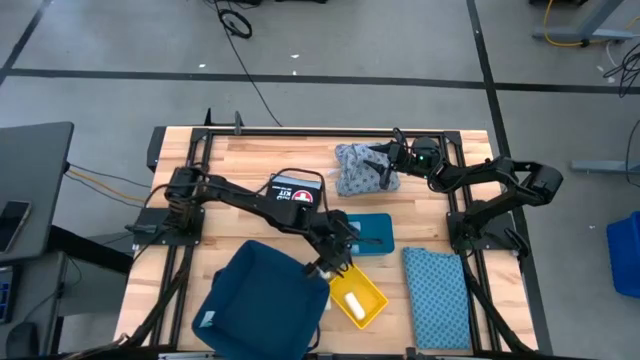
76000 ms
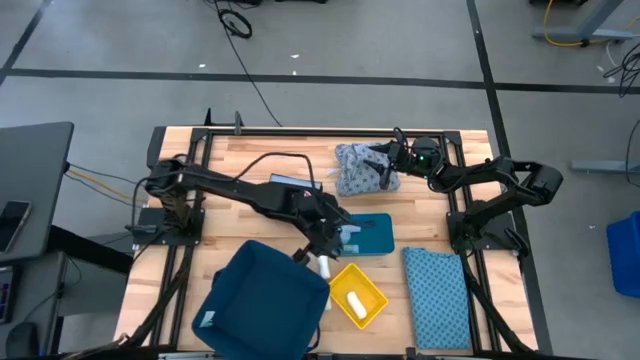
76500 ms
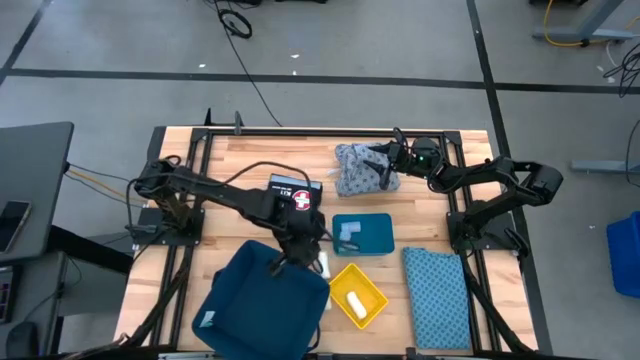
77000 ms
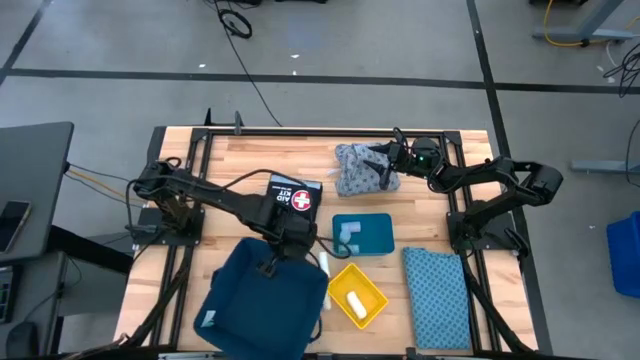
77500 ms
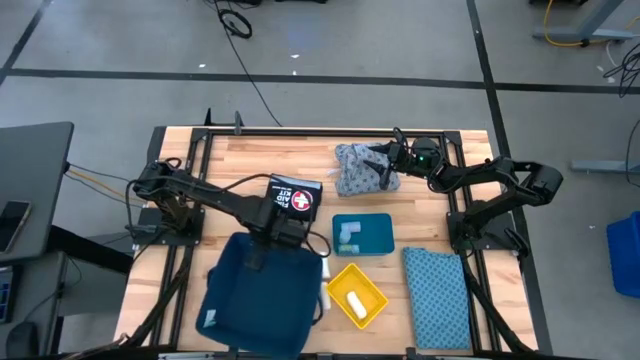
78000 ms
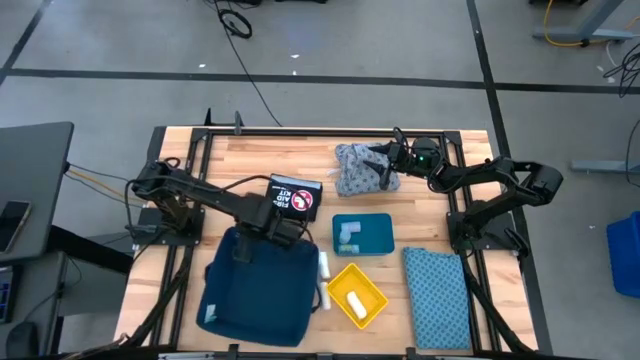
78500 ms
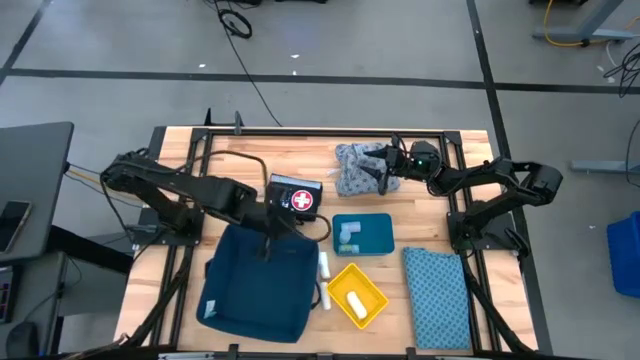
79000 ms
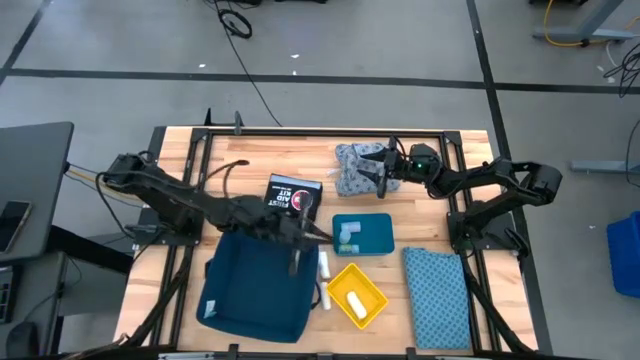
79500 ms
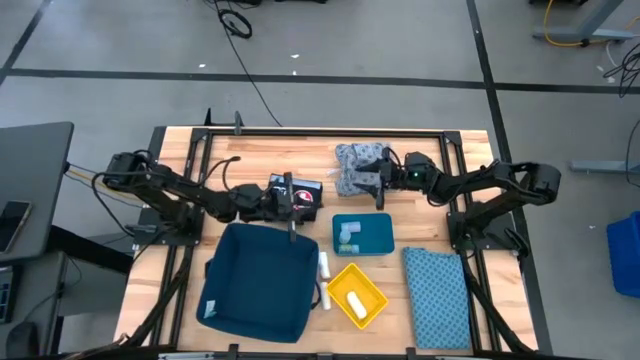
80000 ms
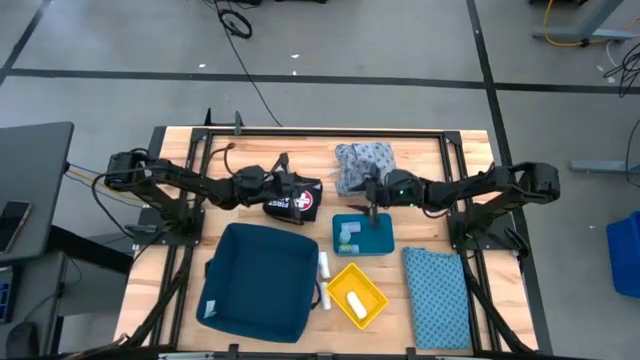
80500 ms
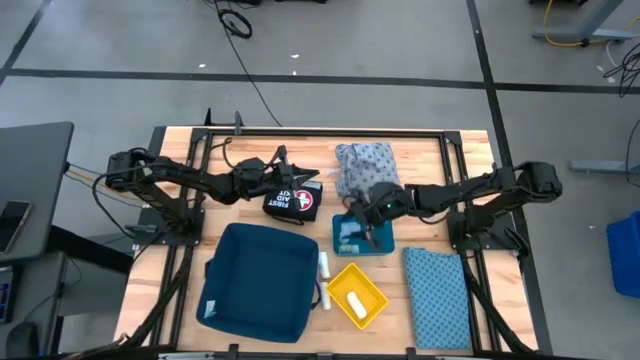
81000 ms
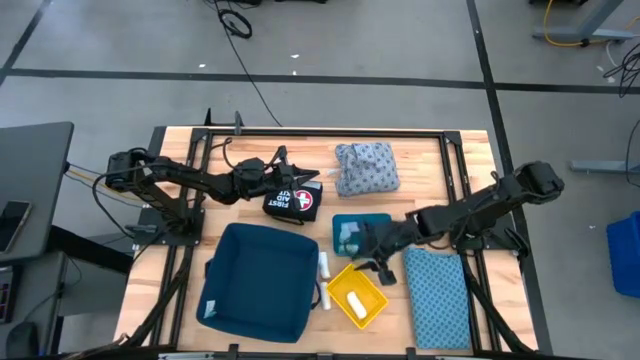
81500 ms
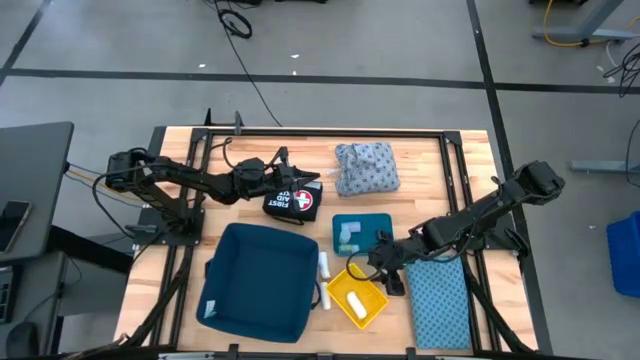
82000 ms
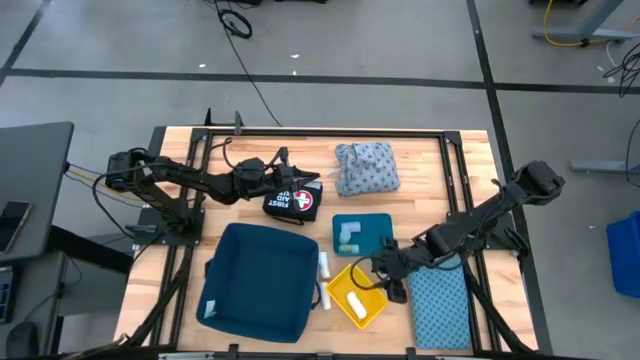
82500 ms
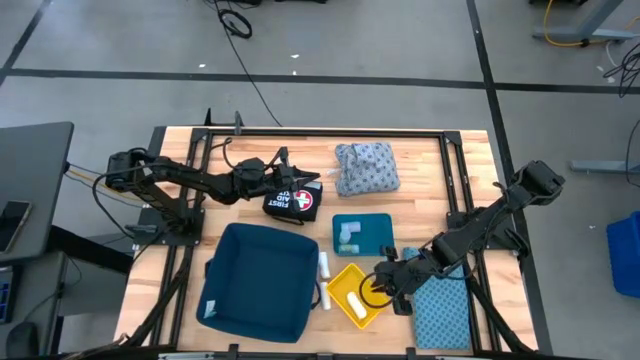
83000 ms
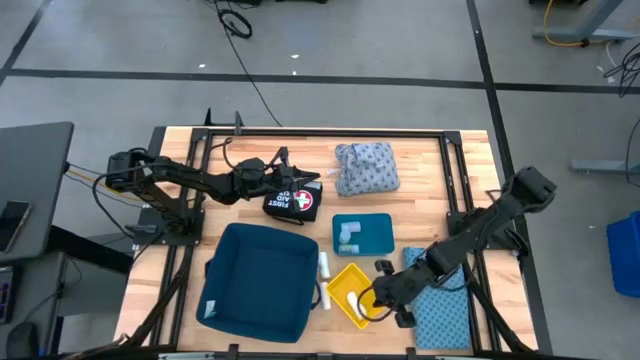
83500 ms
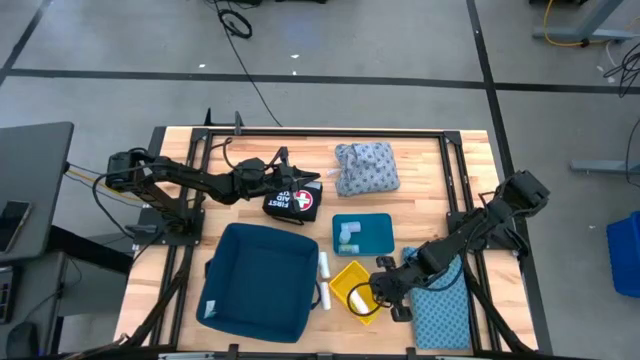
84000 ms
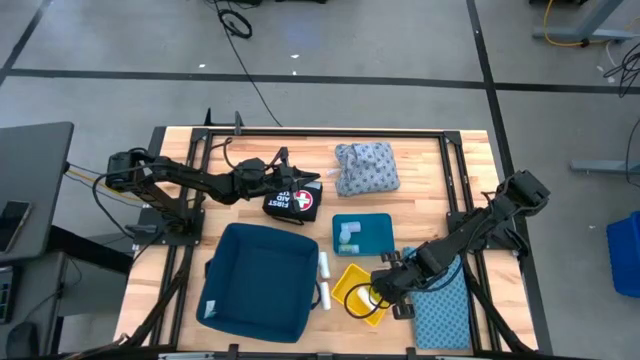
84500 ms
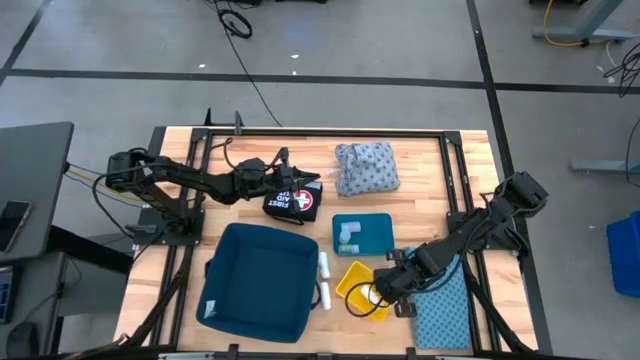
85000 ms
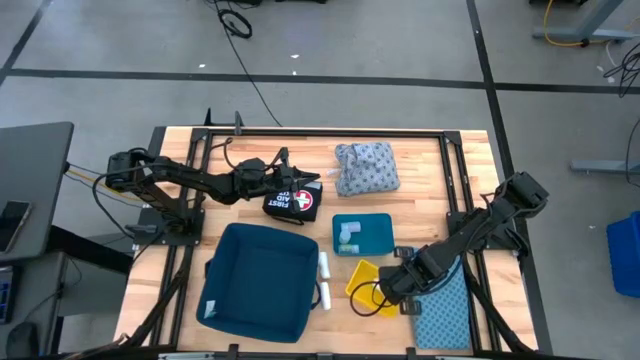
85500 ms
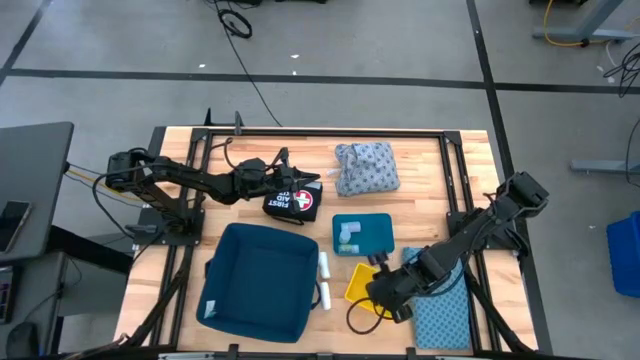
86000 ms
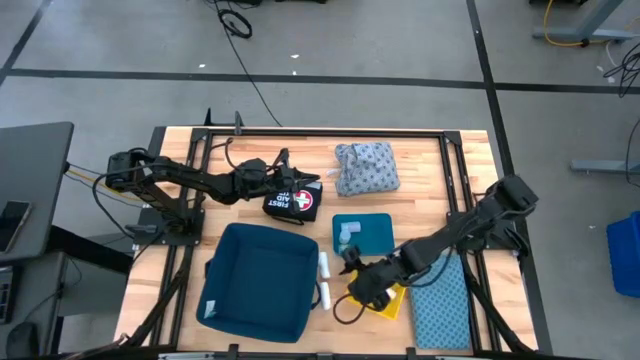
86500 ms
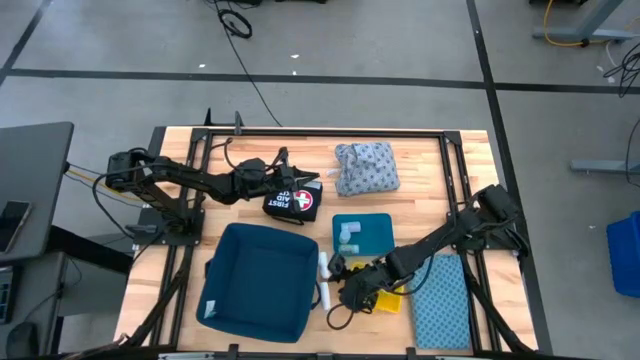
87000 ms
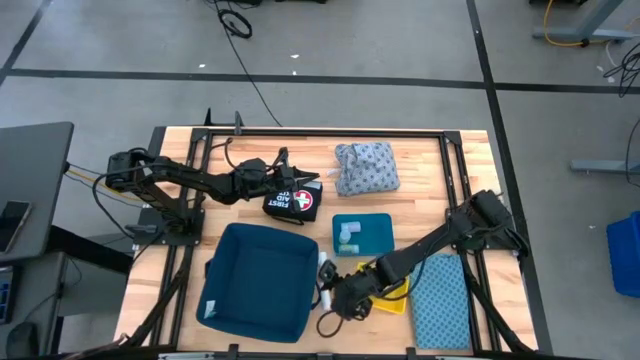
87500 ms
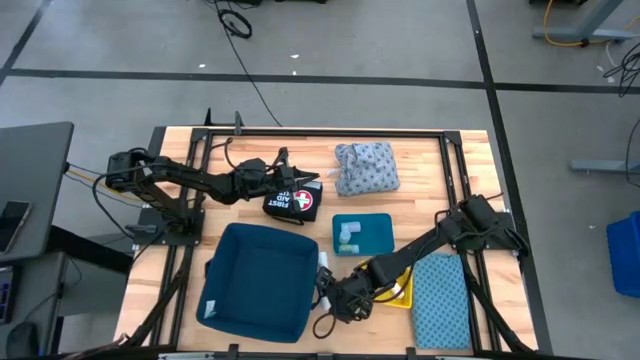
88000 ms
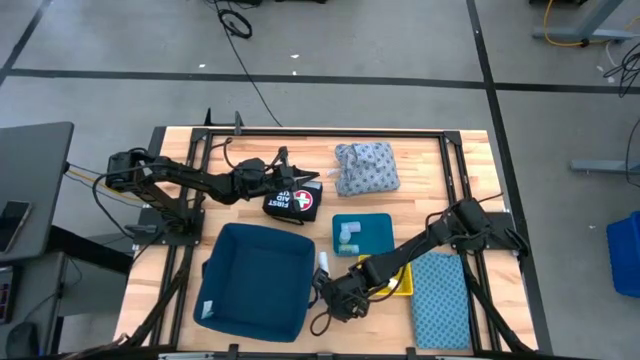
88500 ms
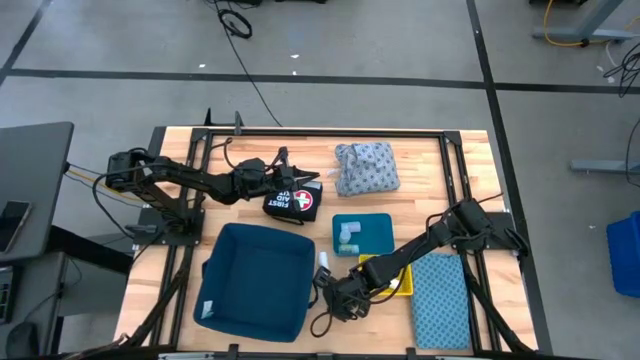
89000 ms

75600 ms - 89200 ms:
Task: Pick & place medical supplies in basket/bin
Put the bottom white gauze into the yellow bin

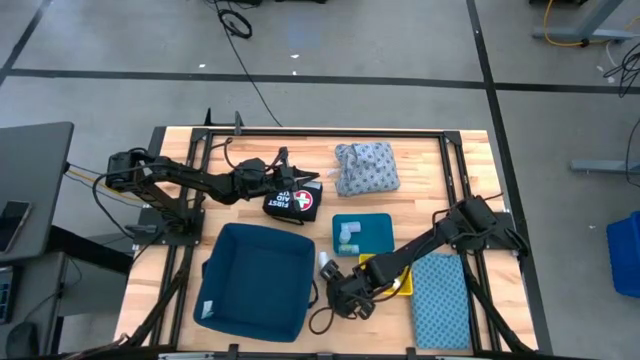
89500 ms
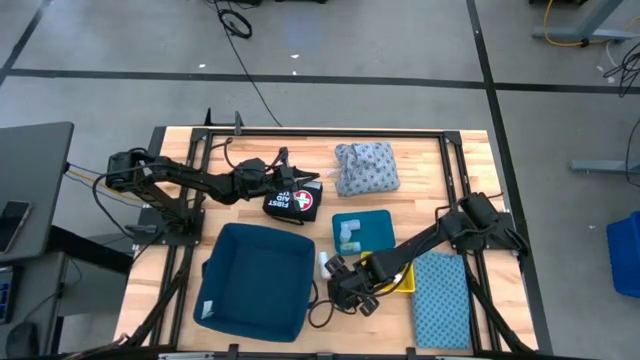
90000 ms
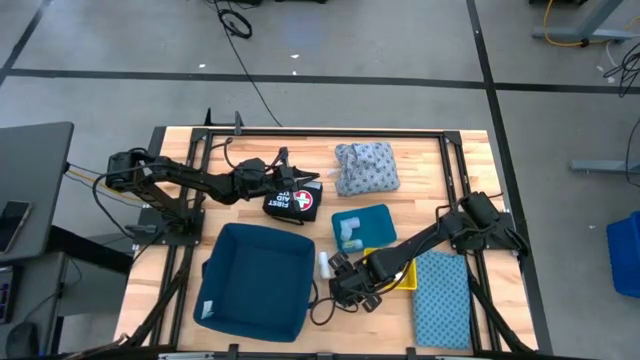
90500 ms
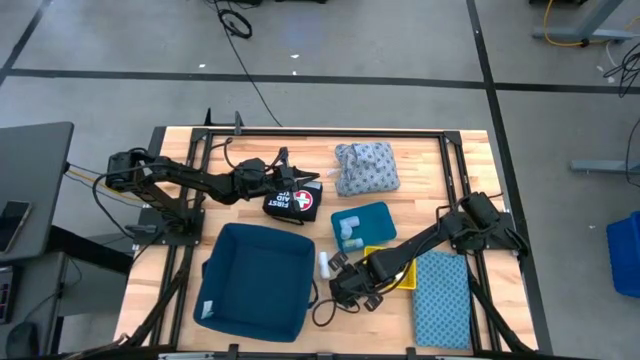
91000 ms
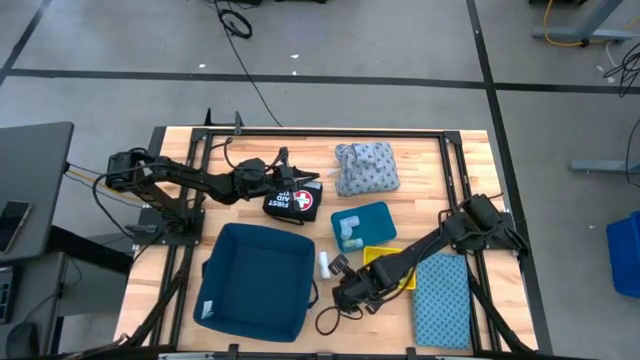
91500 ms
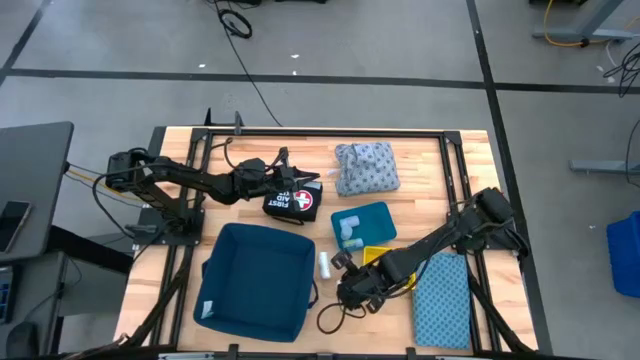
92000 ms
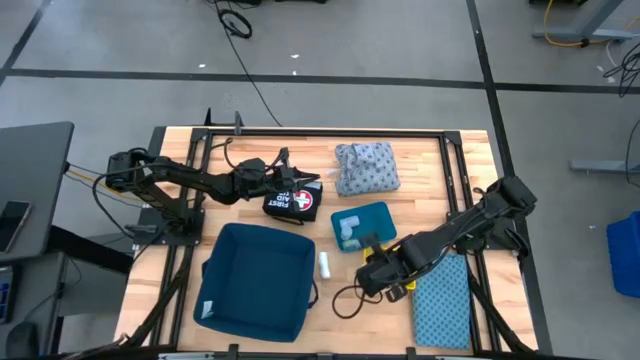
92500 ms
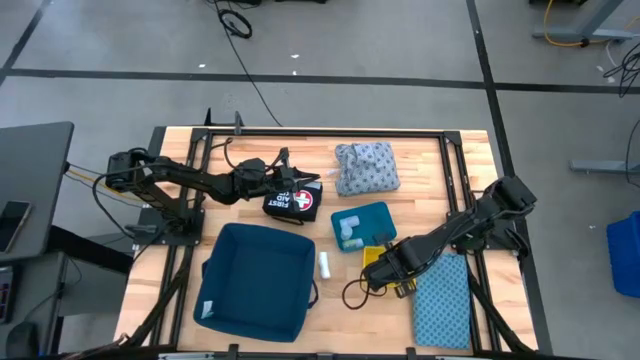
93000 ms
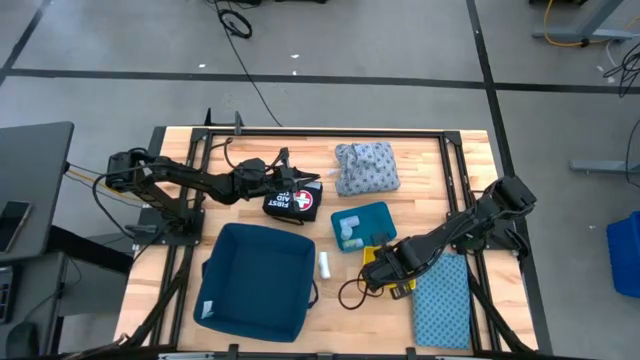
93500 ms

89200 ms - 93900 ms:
Put the bottom white gauze into the yellow bin

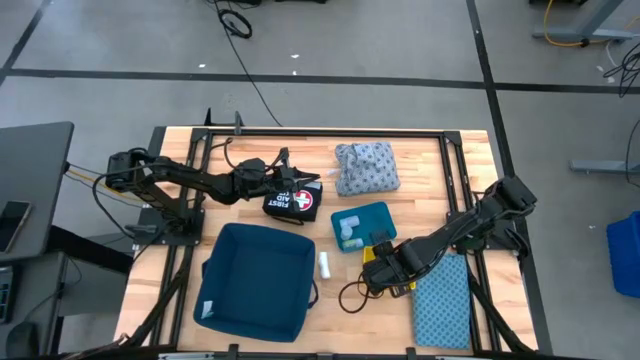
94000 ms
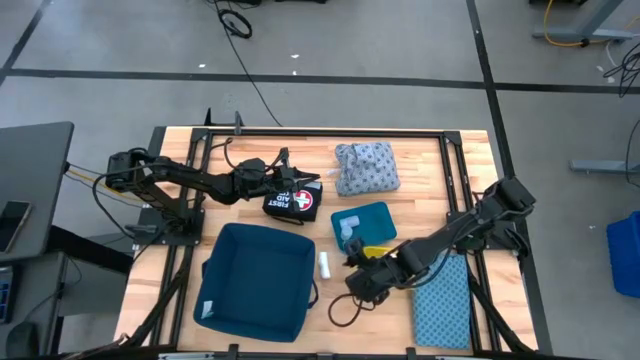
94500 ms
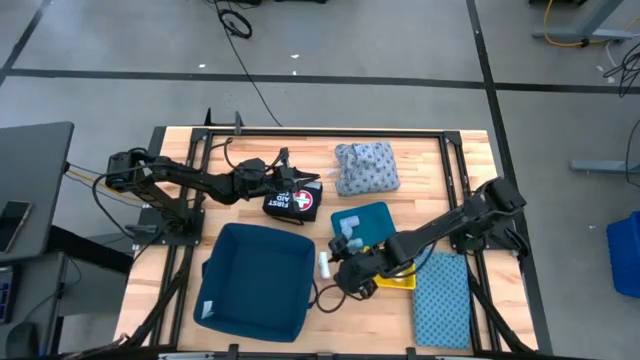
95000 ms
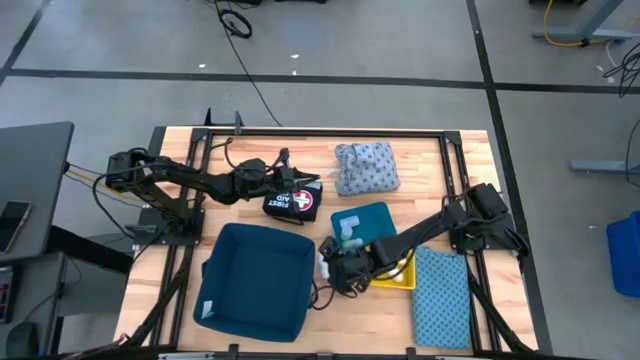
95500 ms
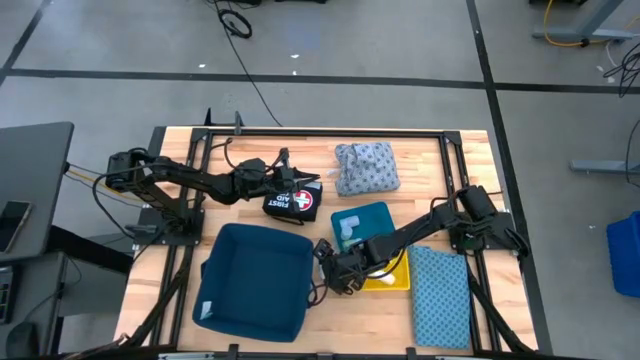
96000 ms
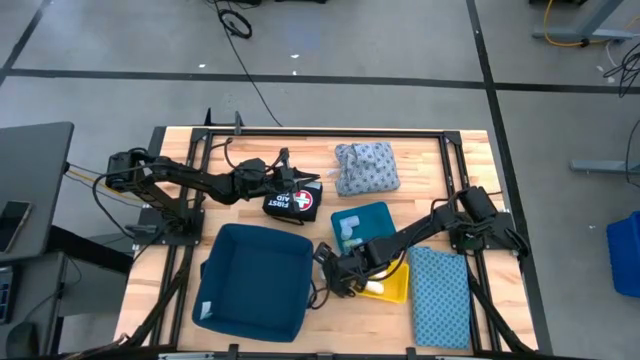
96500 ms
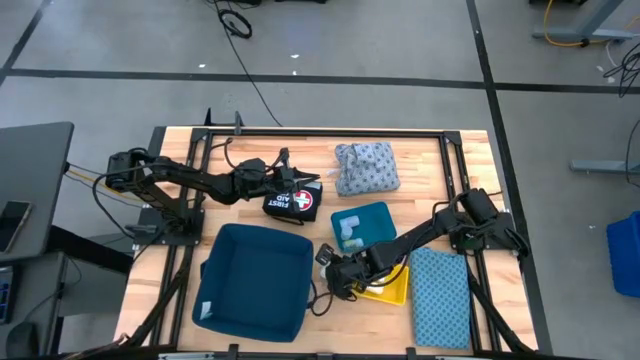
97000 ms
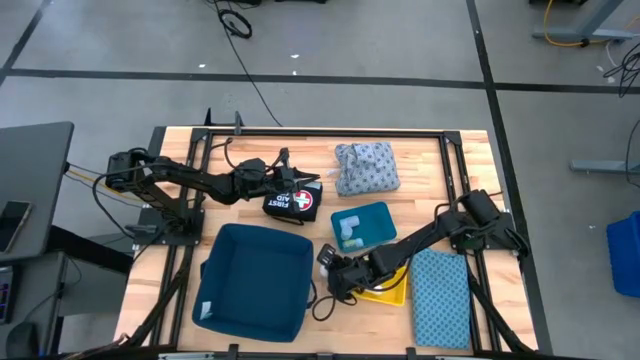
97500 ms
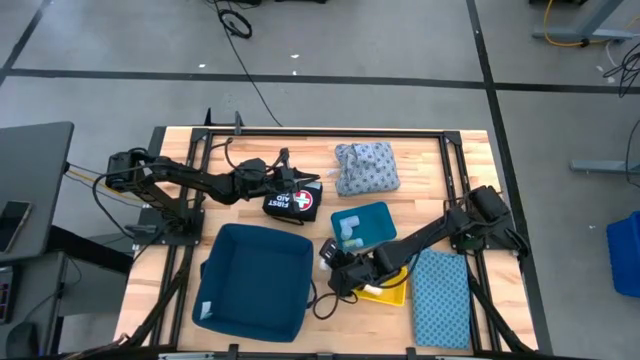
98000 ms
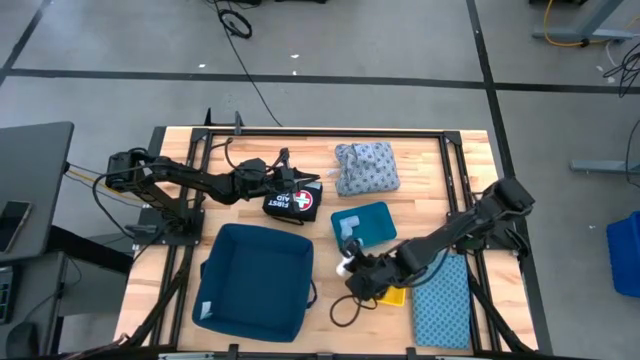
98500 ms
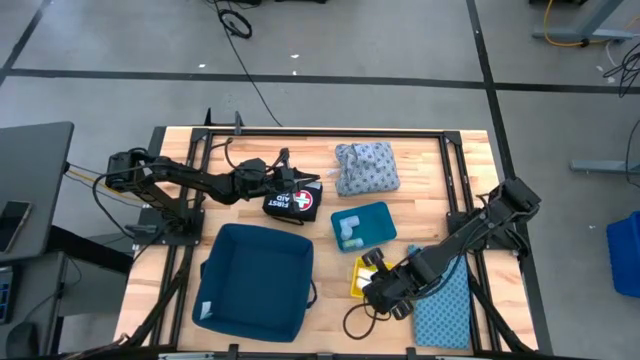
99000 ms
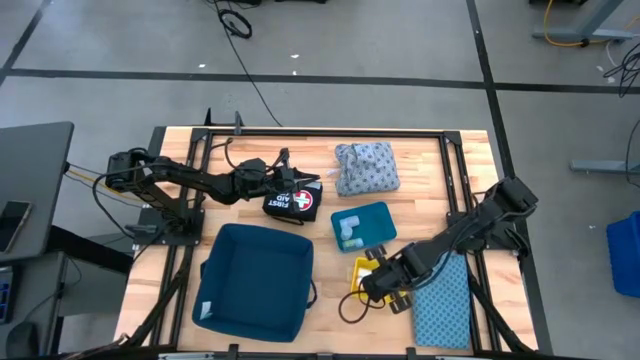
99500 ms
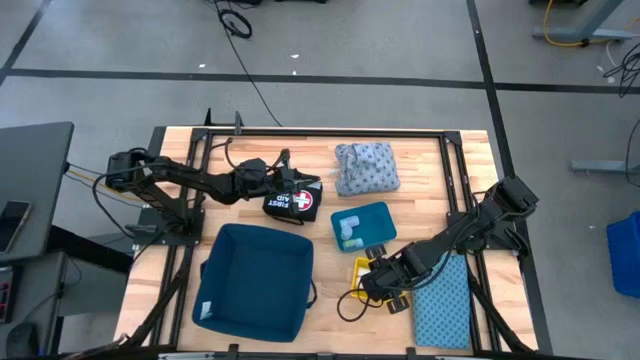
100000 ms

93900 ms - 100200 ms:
Put the white gauze into the yellow bin
